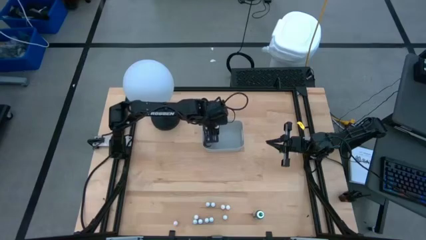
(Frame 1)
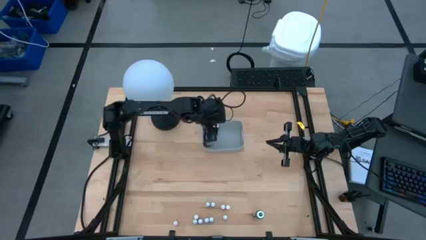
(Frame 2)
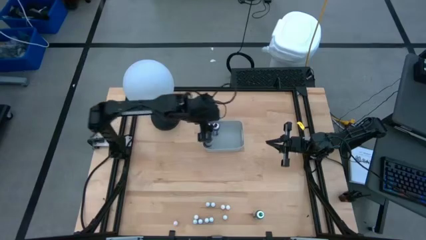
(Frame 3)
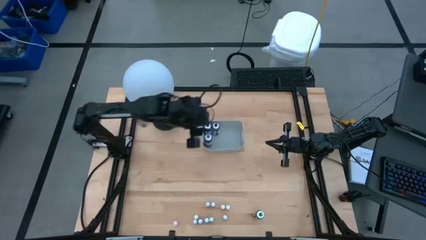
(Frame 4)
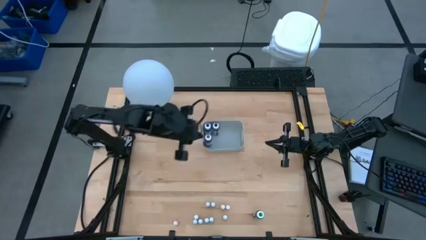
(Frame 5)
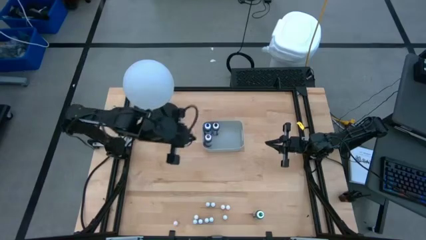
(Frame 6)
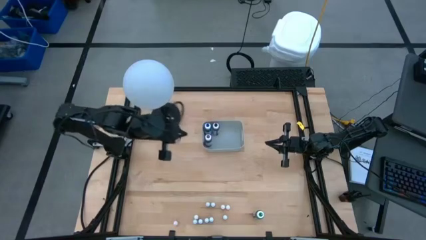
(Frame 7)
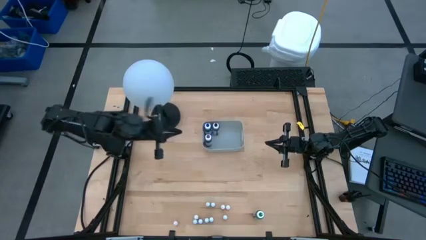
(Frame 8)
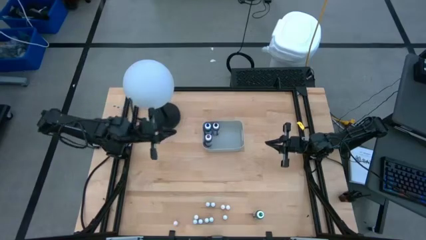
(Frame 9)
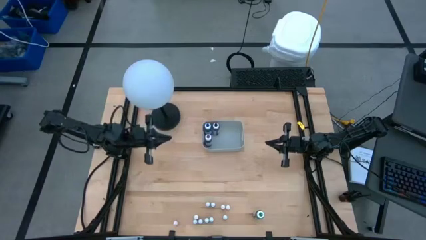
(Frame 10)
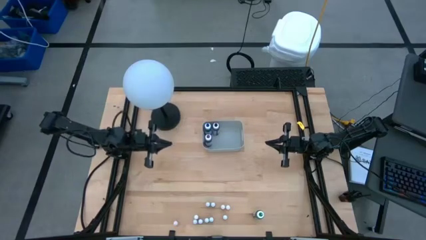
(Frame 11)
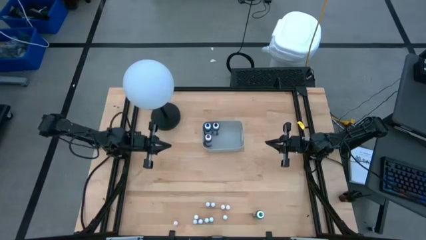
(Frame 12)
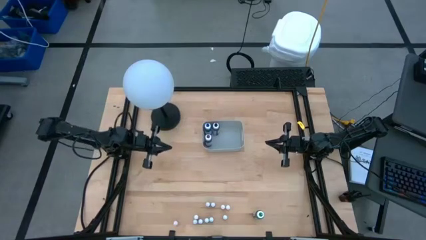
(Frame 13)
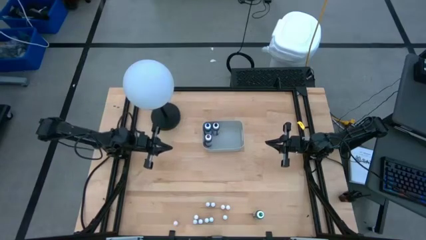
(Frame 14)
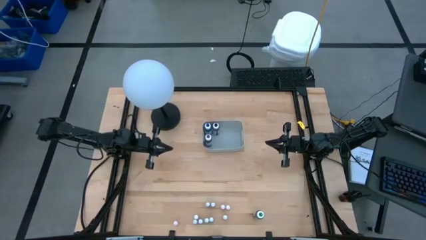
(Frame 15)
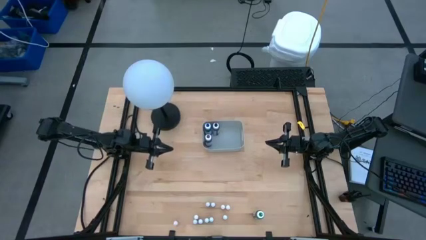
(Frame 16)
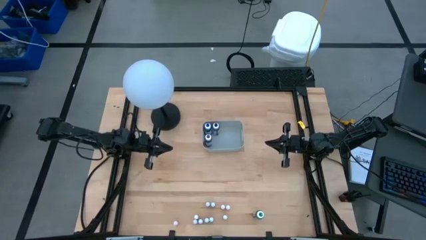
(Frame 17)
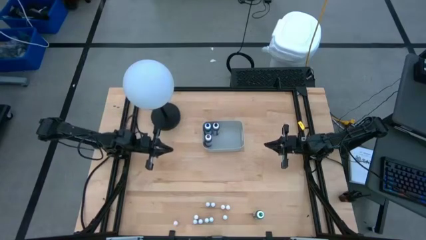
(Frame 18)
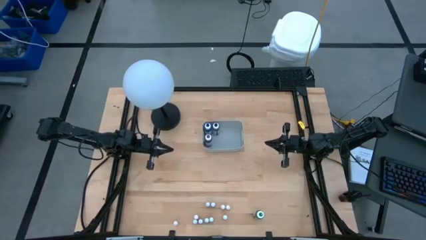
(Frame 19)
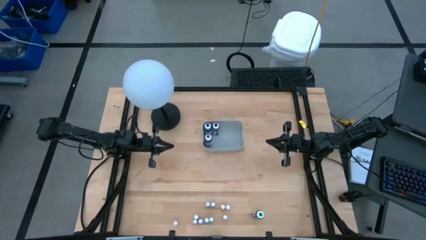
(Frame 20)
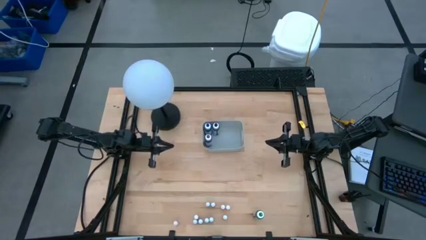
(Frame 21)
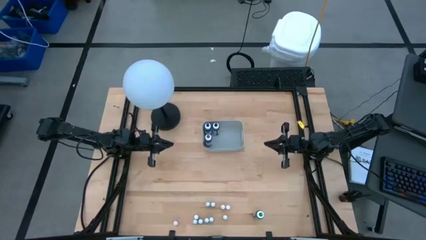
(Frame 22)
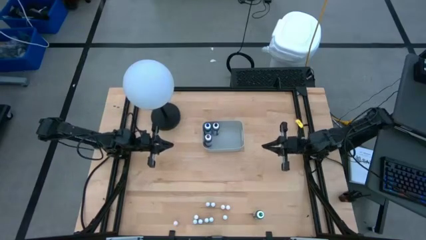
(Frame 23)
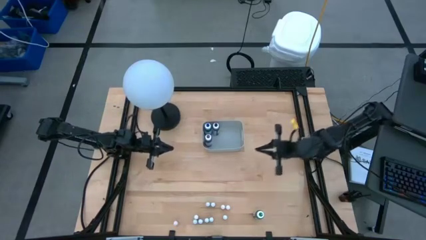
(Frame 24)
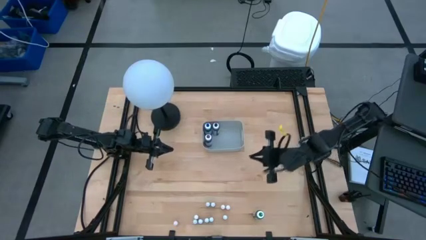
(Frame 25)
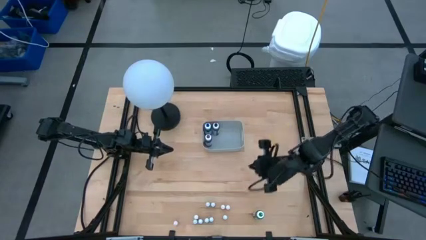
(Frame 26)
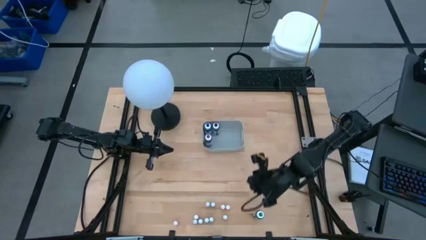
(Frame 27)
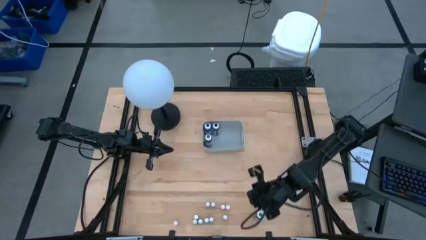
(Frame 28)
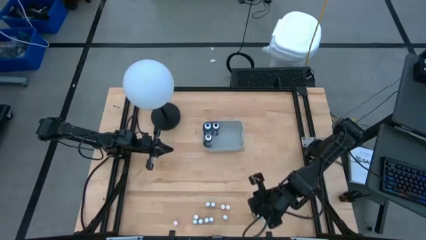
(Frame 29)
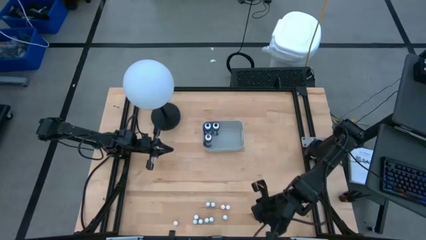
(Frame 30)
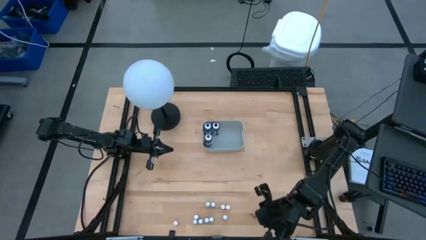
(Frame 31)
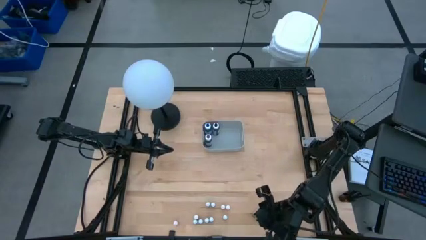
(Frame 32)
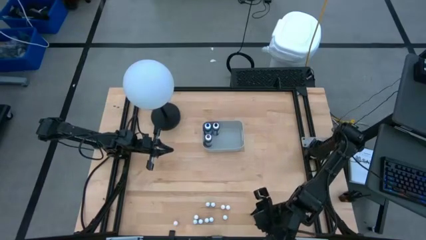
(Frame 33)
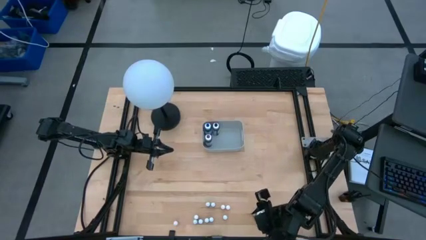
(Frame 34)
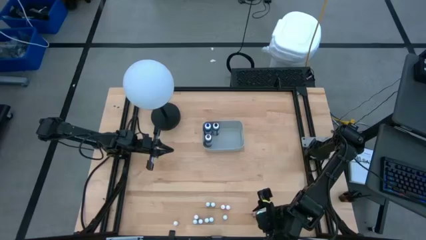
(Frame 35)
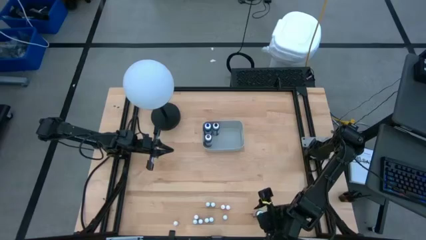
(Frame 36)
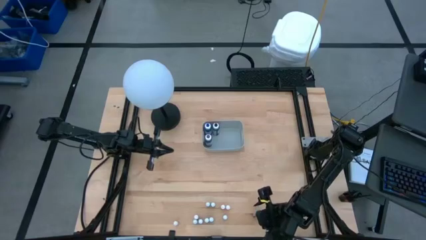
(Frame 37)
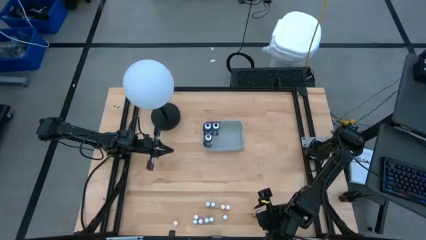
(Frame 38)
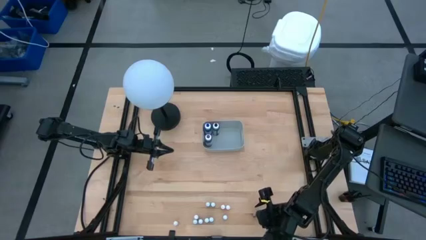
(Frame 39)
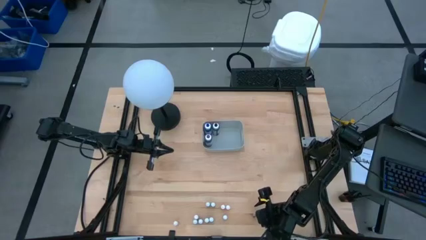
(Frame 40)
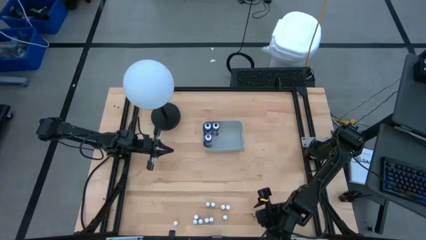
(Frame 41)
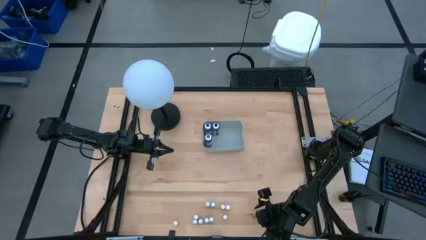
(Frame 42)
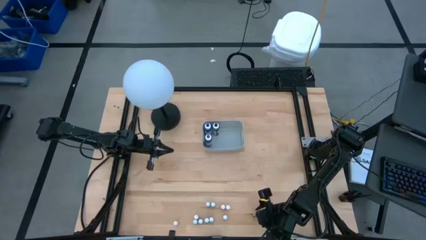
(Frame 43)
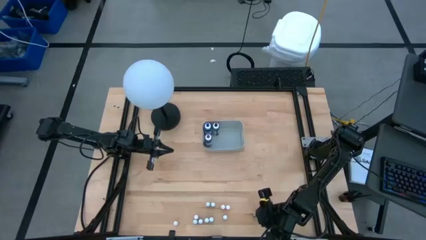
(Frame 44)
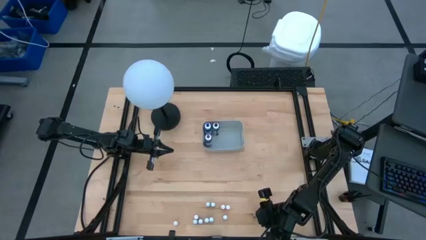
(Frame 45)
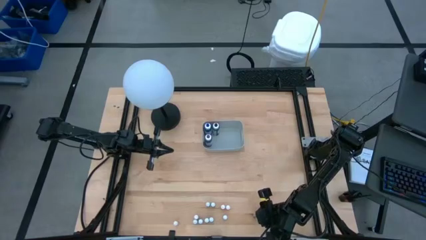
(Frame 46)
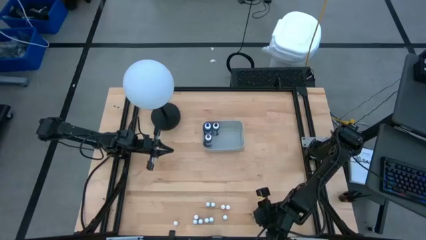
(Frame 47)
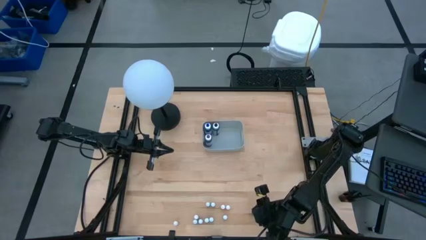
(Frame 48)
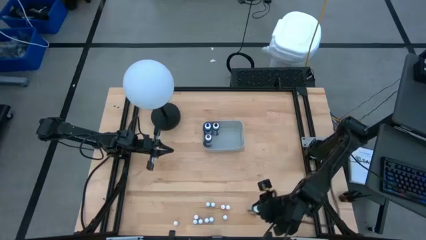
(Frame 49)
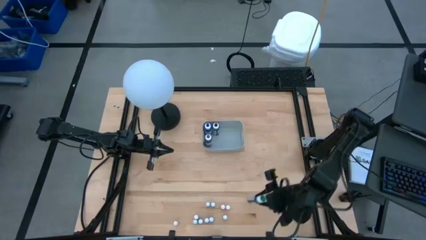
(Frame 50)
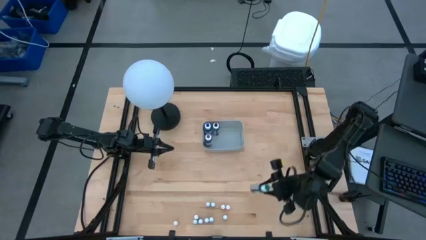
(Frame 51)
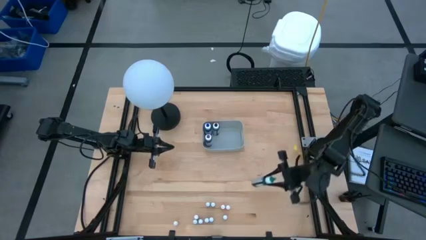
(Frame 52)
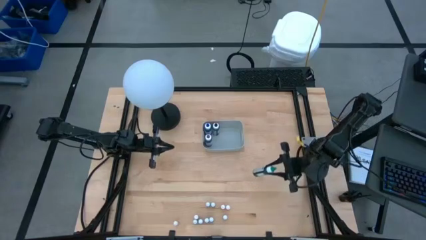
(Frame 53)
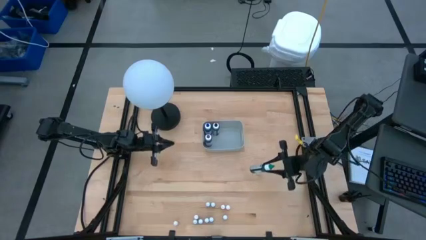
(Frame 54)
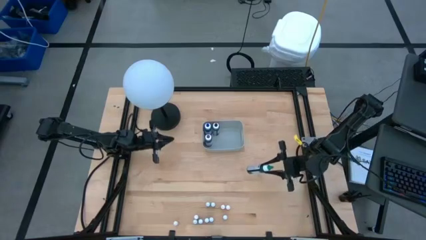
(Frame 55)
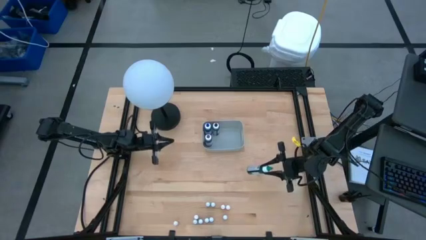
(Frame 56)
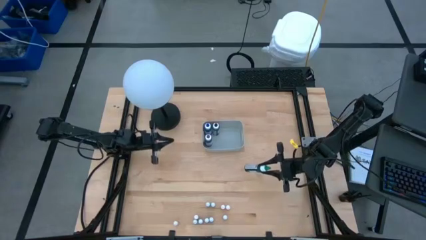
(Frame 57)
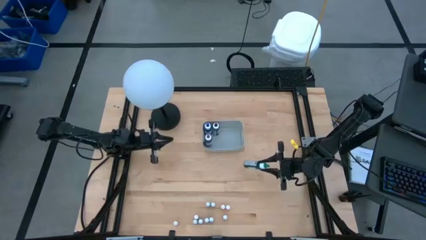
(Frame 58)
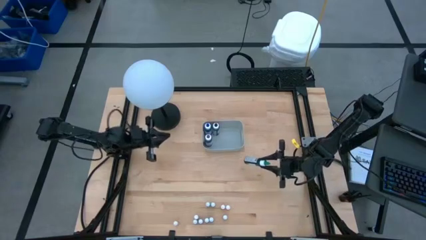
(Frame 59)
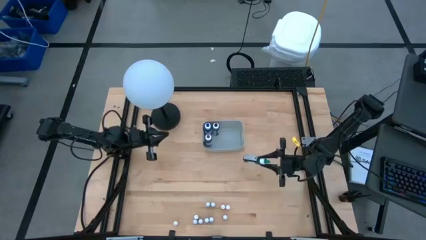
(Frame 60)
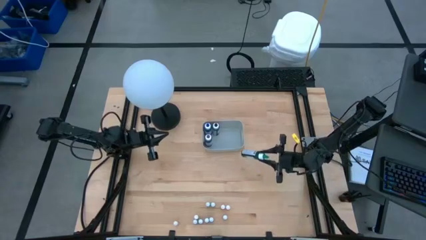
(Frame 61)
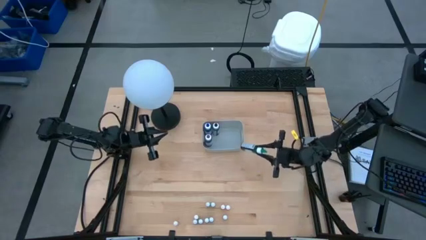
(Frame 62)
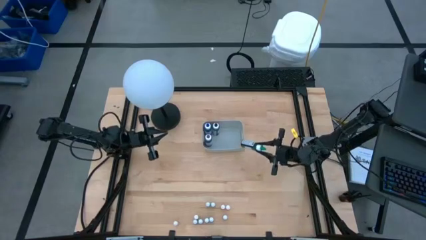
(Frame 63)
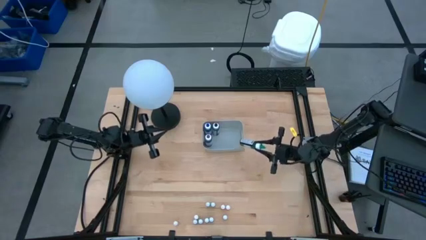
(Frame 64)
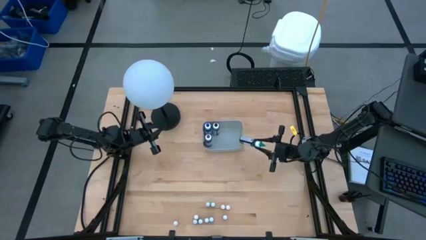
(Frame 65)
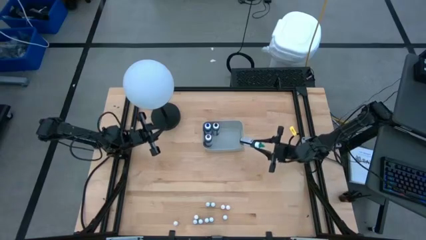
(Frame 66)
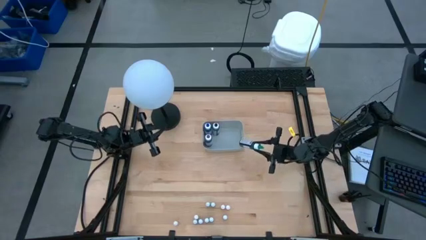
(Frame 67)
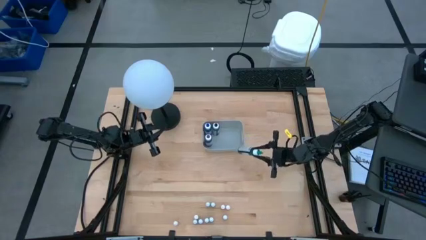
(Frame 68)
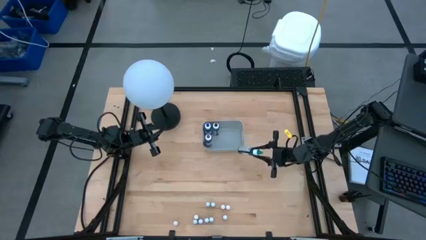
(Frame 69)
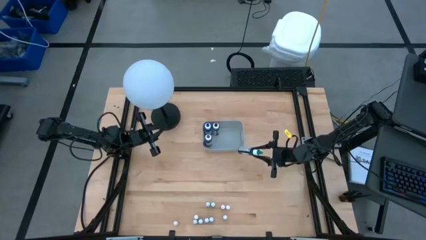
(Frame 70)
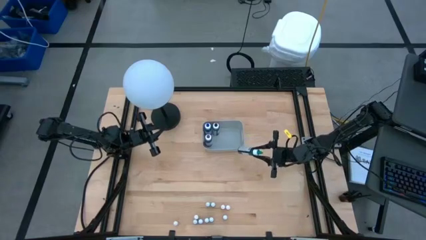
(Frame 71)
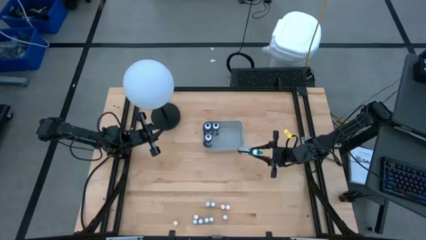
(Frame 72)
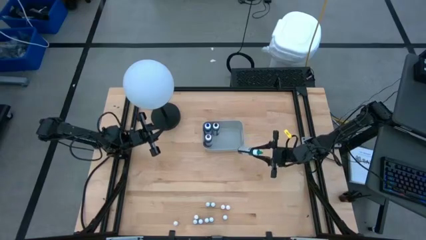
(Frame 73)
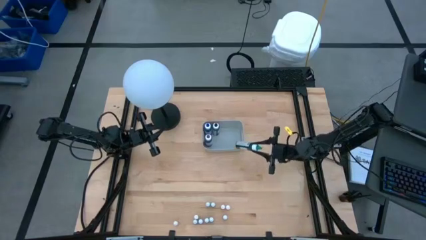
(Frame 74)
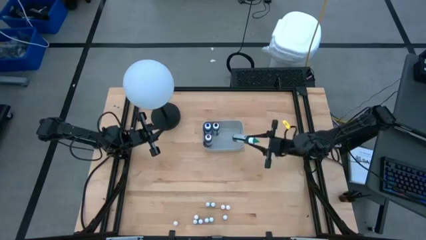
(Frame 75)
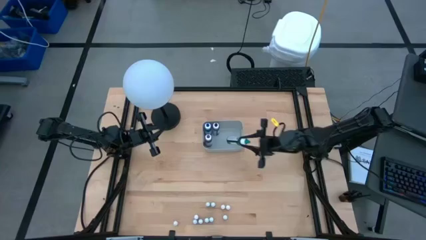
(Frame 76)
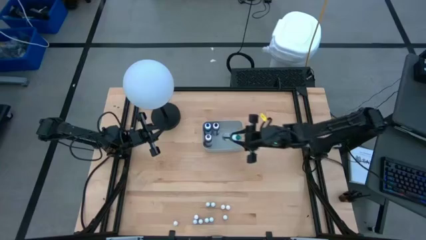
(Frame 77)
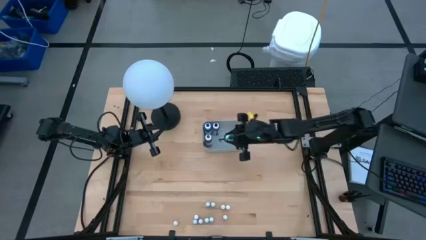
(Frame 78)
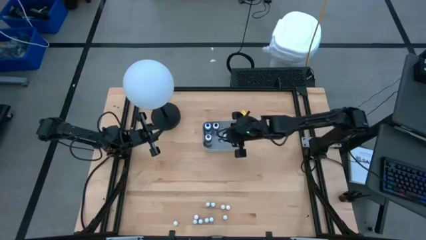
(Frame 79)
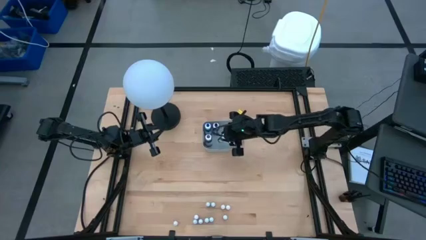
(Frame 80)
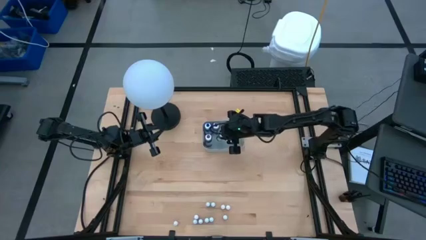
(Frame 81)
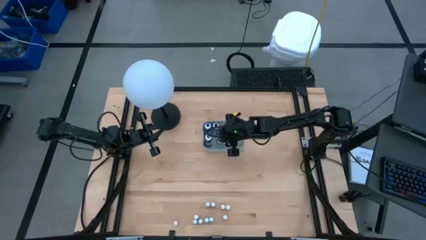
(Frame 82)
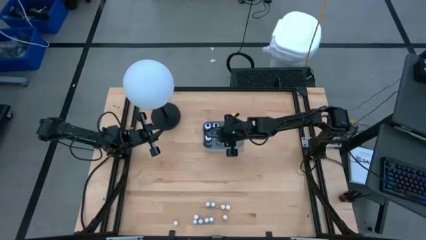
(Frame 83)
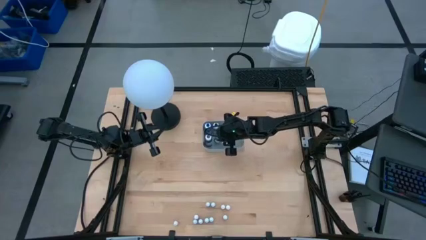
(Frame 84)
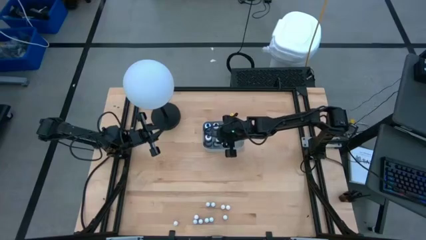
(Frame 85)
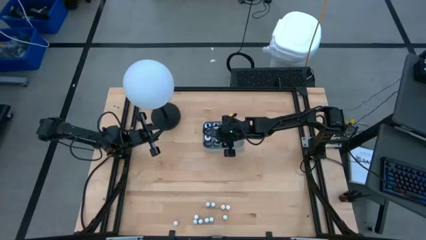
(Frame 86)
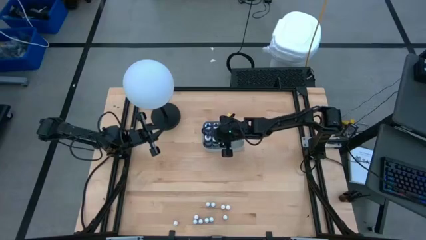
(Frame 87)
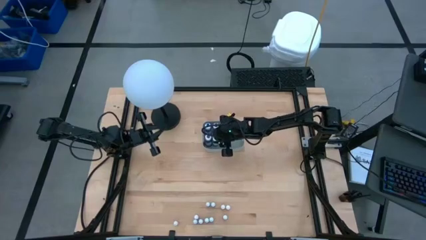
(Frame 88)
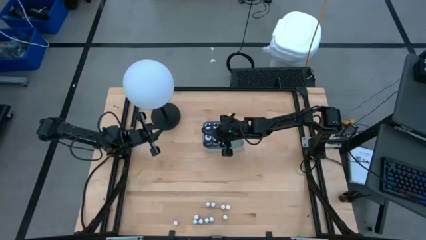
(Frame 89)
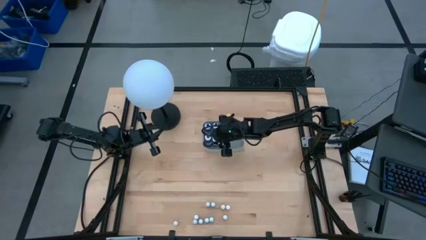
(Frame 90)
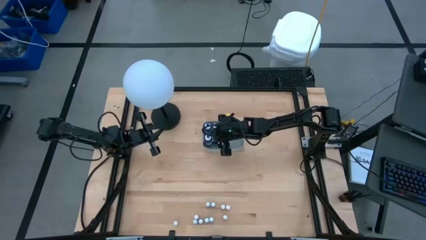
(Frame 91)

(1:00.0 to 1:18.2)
Task: Pick & Place food coloring
Put the large green food coloring bottle into the gray bin
